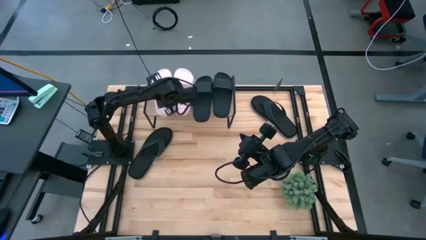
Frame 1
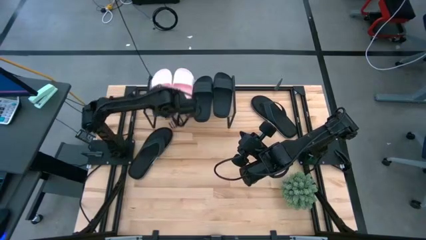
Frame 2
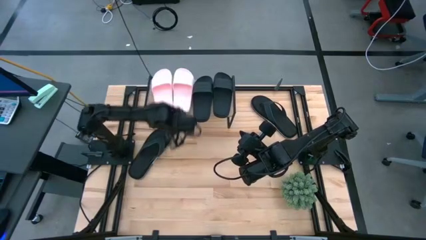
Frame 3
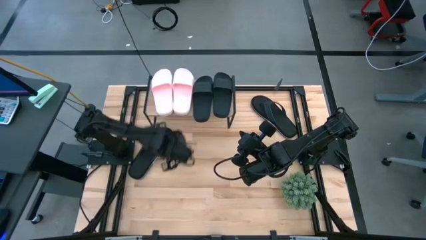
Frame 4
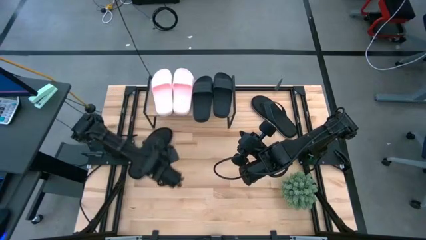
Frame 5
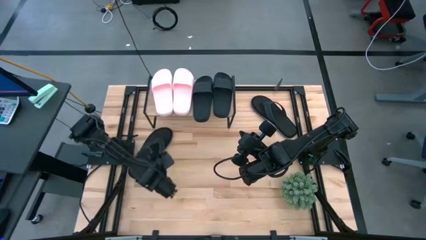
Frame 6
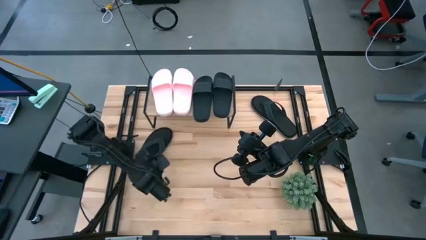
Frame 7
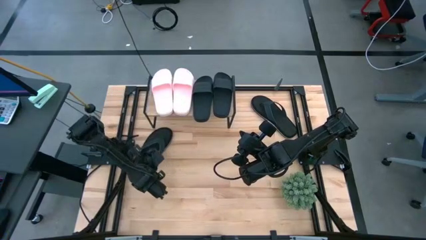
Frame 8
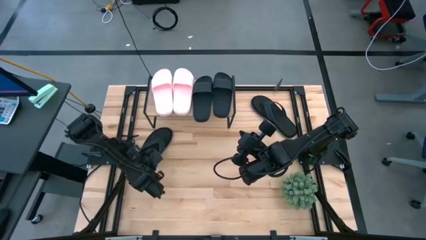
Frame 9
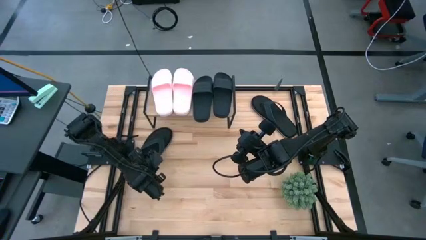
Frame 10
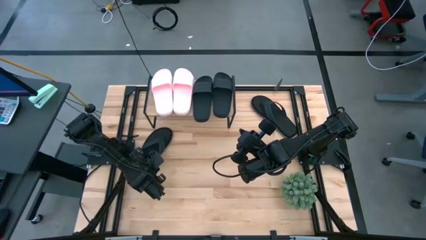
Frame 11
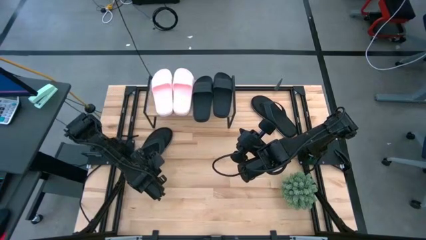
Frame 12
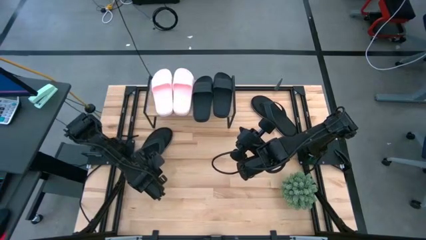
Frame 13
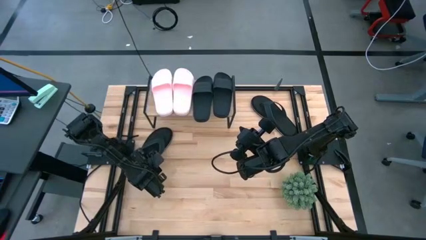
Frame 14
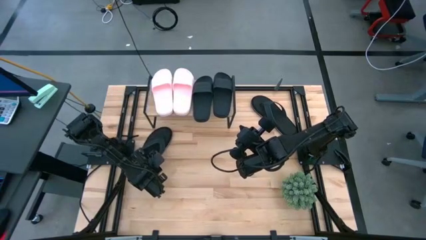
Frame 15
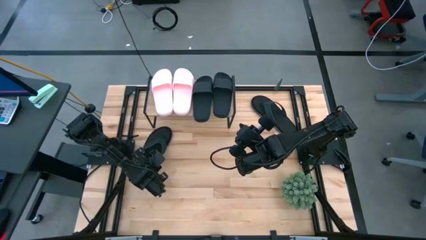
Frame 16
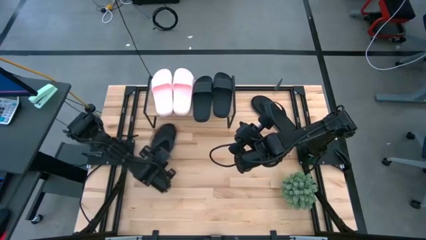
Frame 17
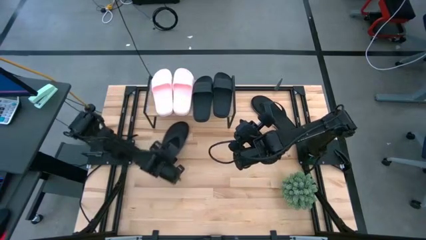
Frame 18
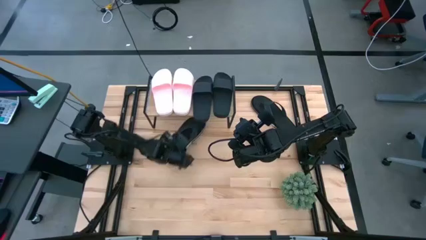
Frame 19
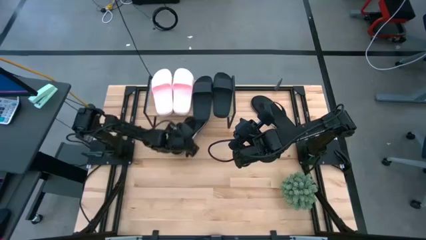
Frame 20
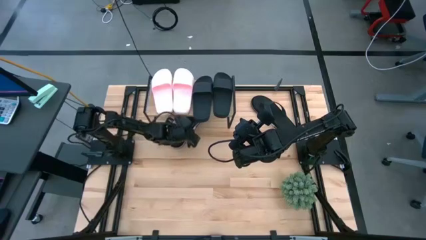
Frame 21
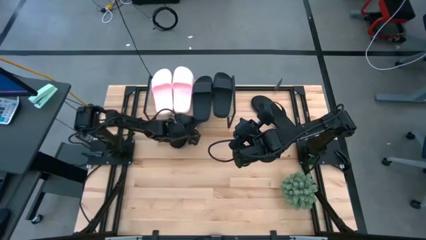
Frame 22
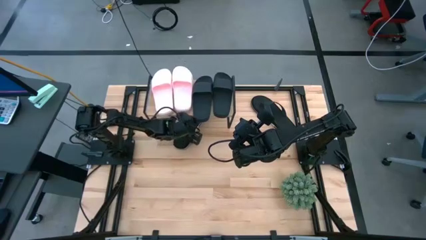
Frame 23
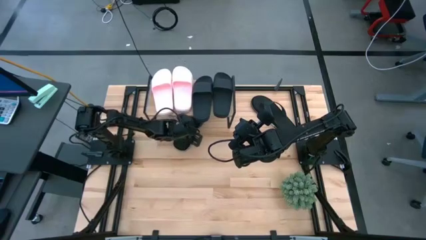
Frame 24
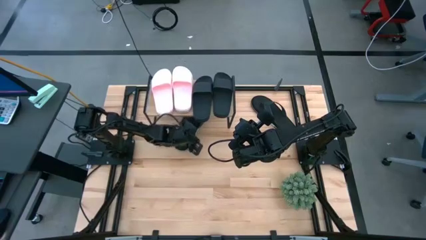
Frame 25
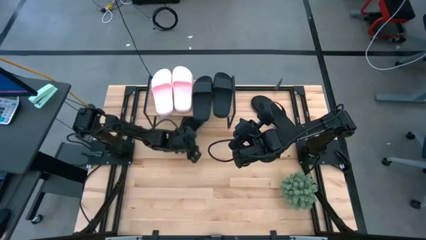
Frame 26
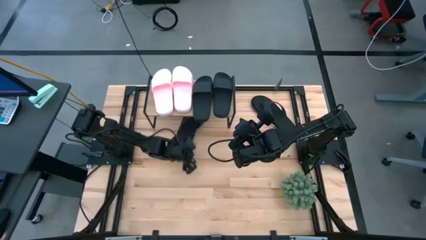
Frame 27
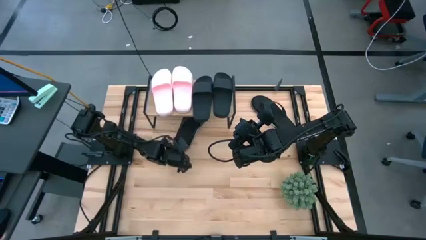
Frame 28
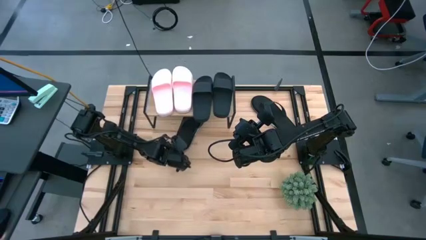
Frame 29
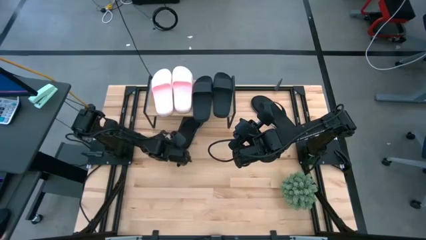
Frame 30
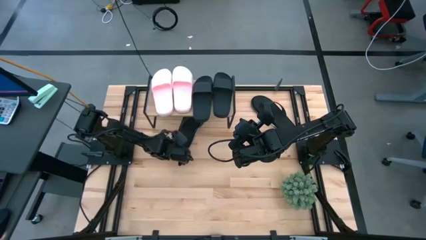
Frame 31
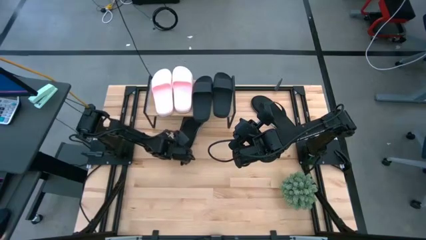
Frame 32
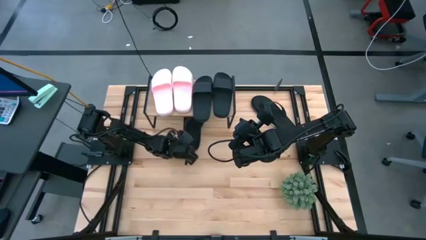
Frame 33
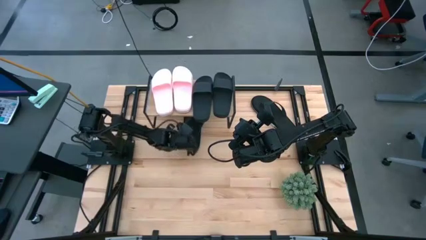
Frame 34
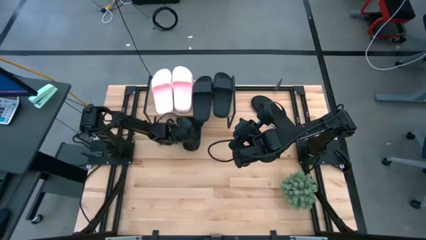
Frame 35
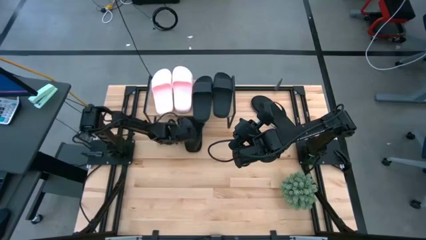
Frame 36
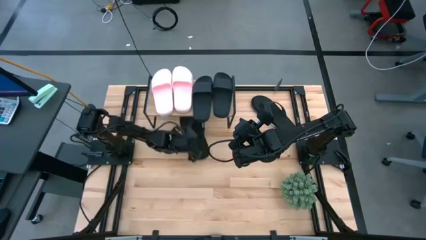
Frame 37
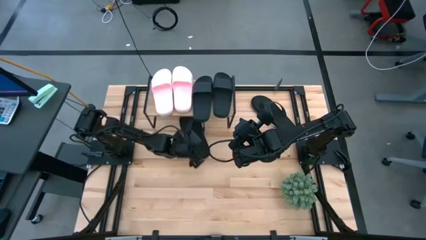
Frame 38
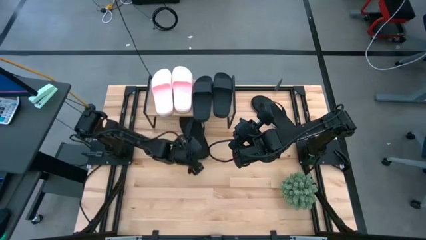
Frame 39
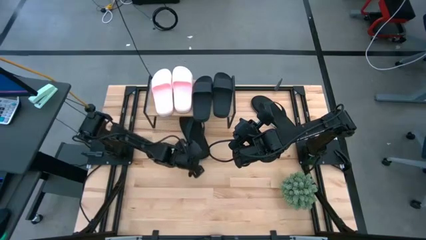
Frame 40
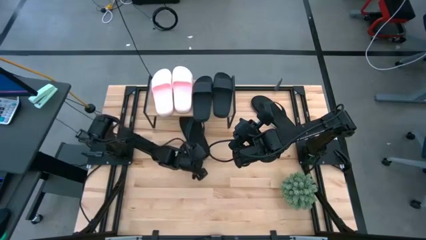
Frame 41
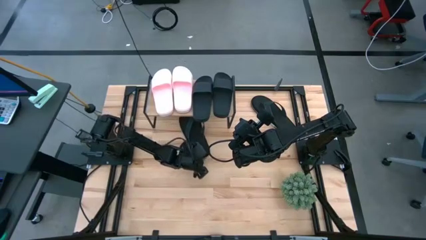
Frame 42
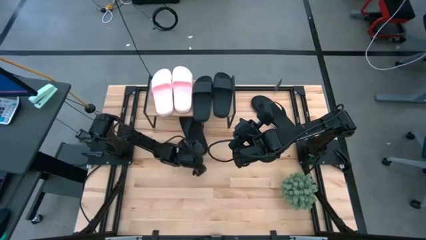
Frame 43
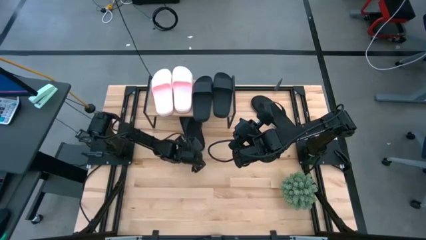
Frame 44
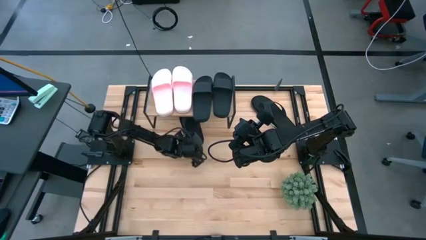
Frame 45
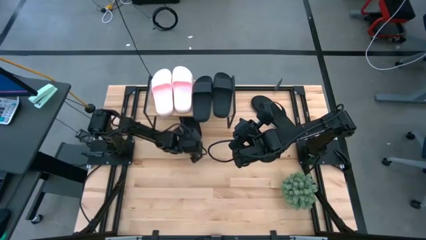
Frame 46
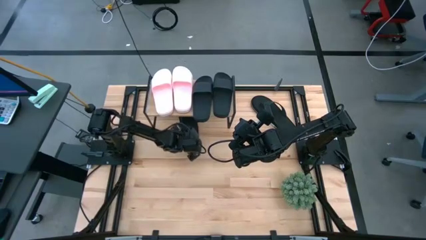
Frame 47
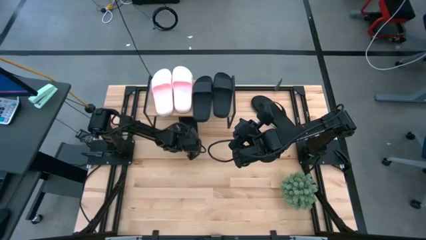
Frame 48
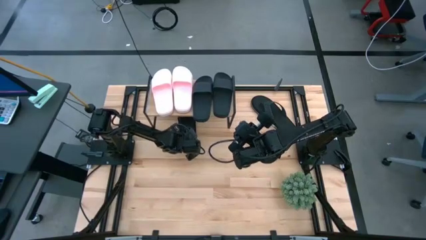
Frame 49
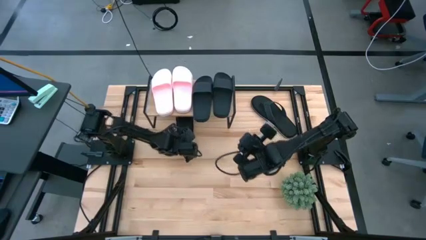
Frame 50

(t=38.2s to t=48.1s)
Task: Pick and place slides into the shelf
Put the left black flipflop under the shelf

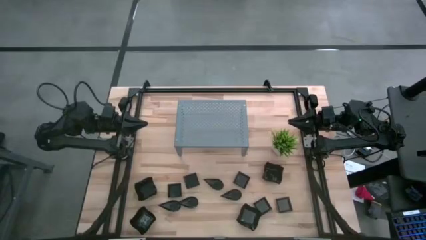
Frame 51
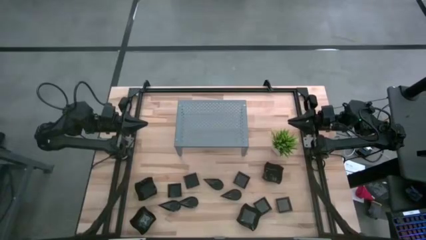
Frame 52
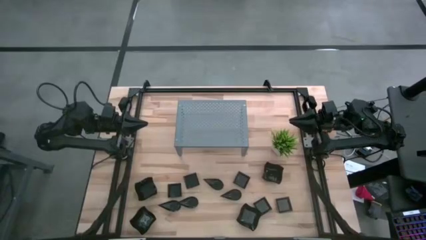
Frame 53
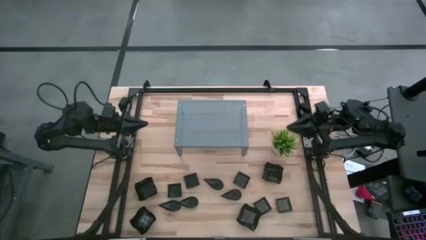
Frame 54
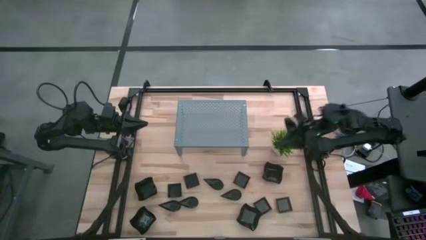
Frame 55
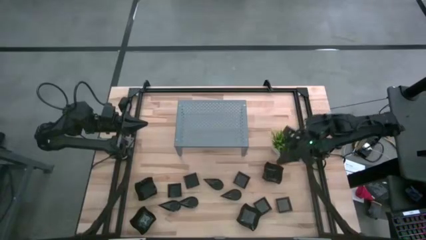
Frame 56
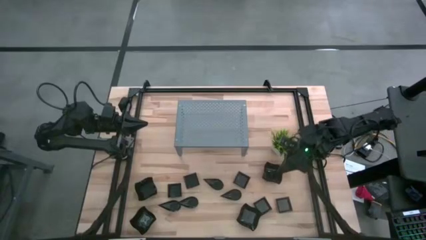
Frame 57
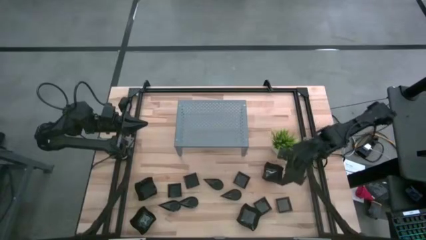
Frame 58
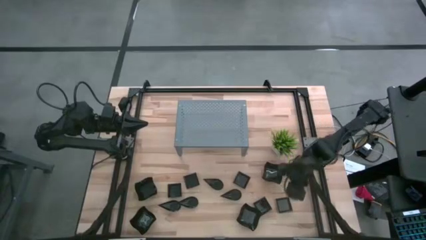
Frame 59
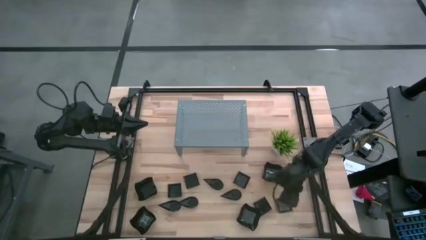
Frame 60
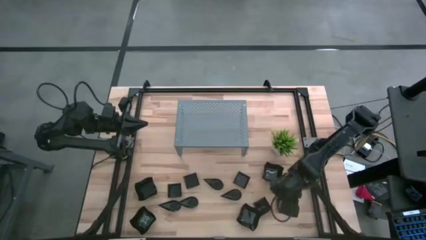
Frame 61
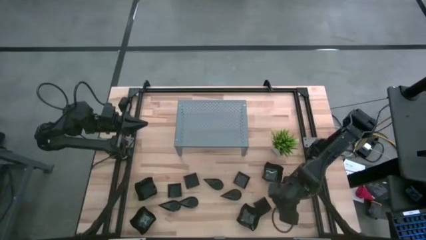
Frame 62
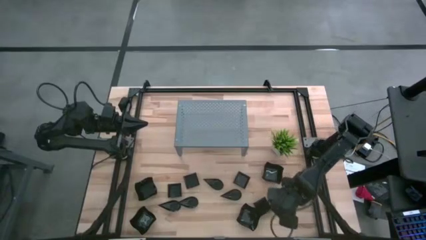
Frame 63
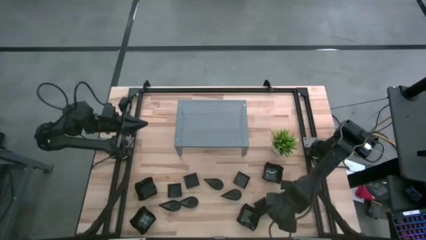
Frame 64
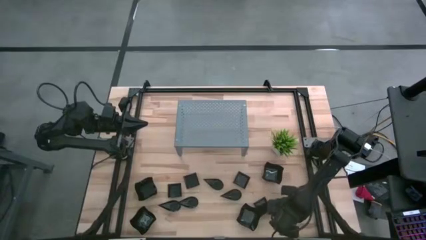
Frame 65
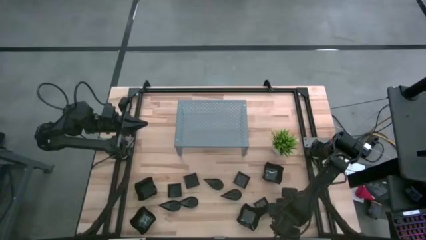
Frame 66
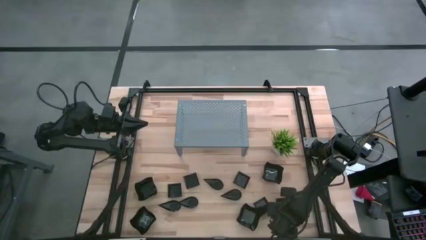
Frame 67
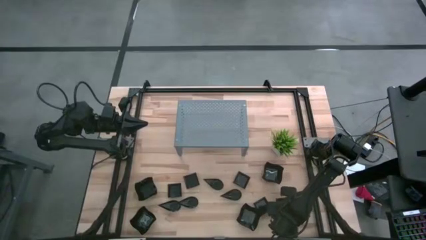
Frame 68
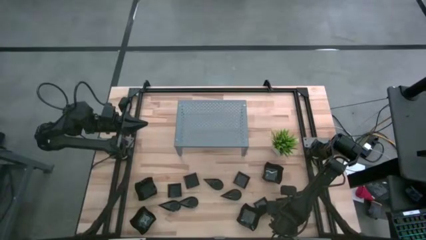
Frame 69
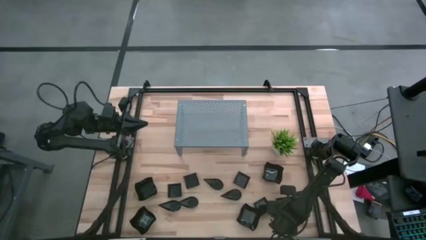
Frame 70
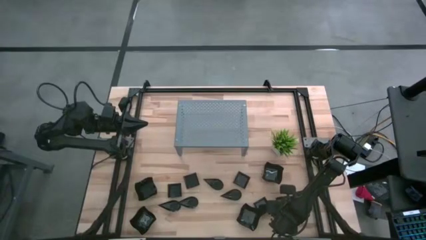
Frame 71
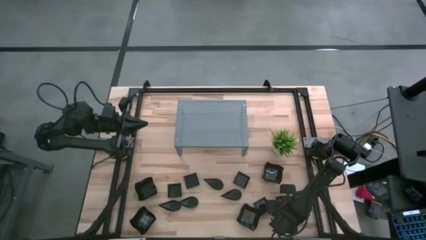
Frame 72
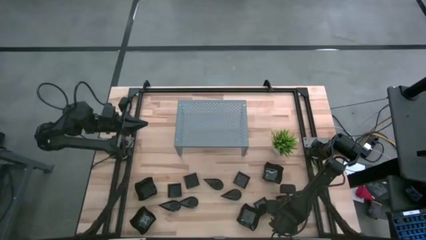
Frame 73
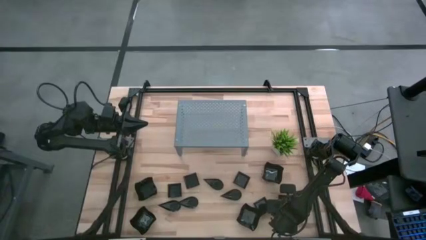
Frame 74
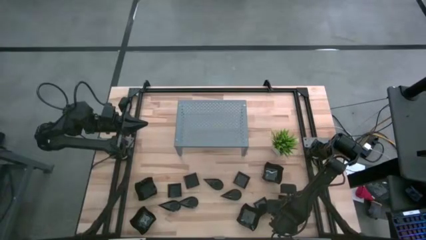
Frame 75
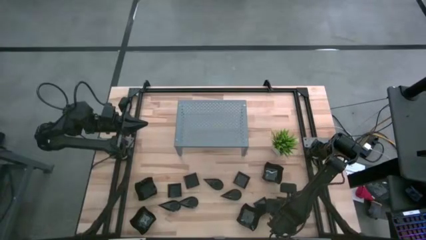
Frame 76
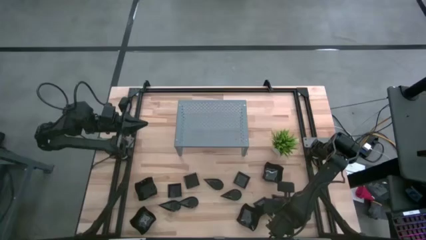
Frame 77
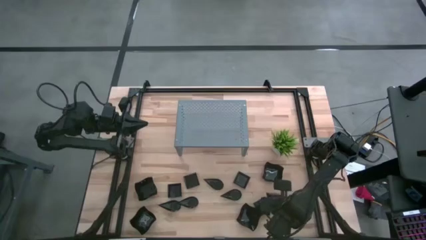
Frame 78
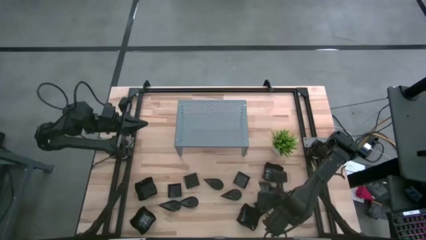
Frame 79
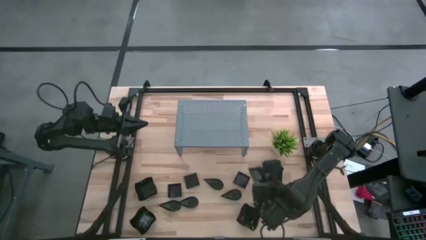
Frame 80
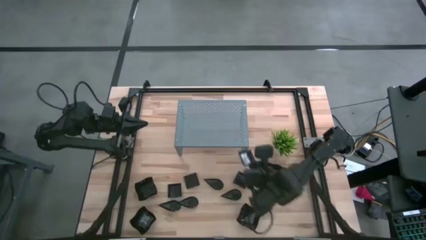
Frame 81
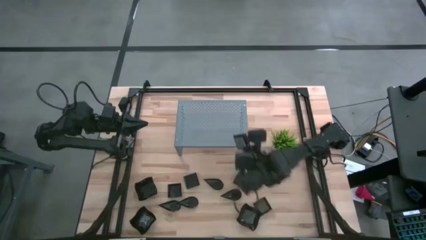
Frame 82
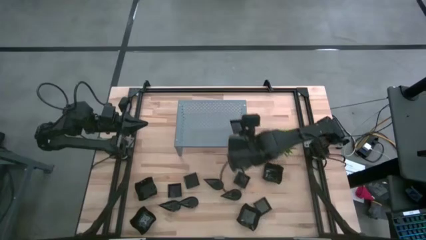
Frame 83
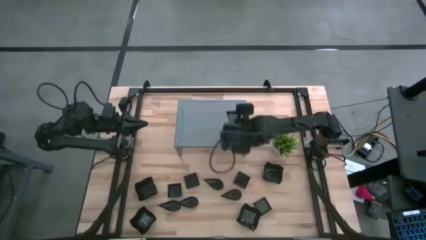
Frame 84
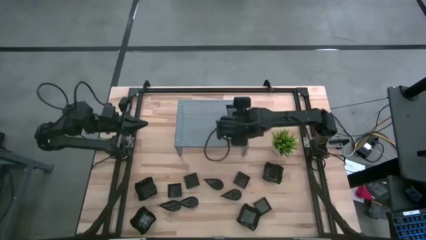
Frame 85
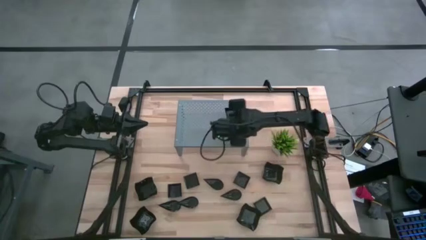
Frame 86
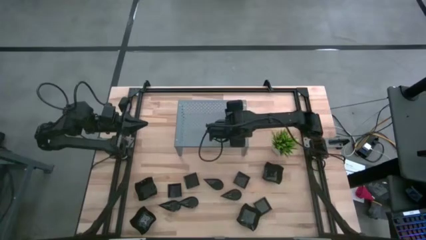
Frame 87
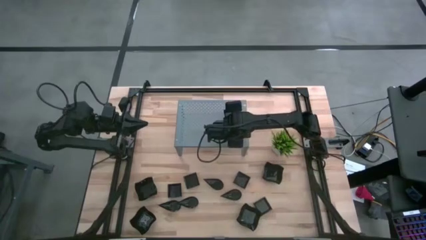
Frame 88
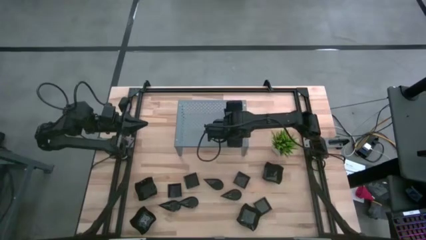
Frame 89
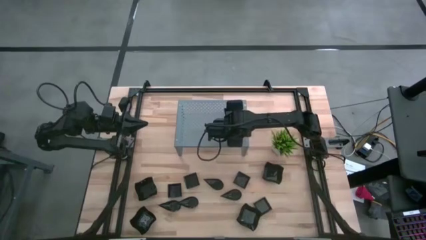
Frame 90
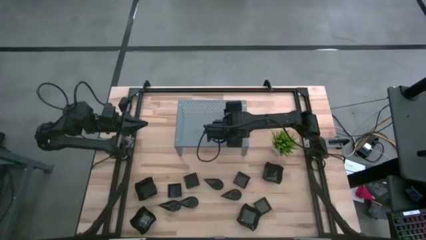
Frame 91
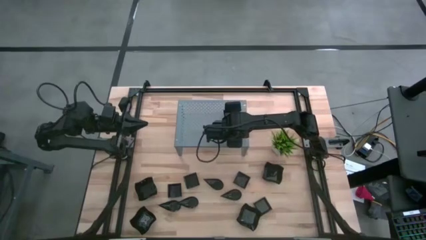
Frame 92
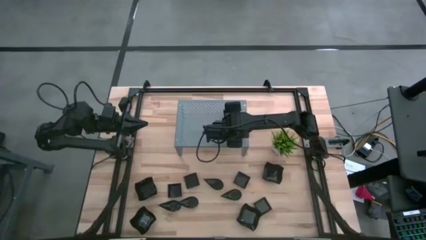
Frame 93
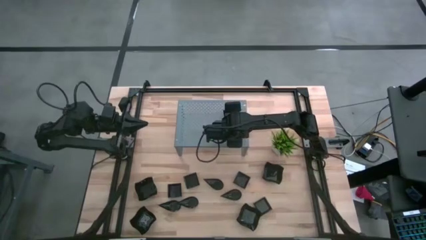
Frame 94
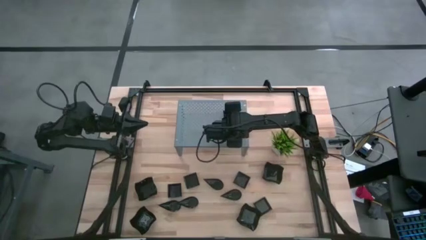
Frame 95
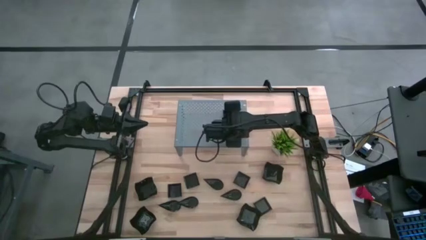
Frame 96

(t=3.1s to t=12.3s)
Task: Pick & Place Mini shaped plates
Put the square plate on the shelf
